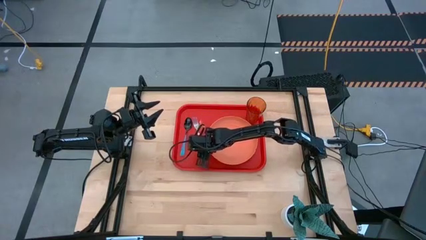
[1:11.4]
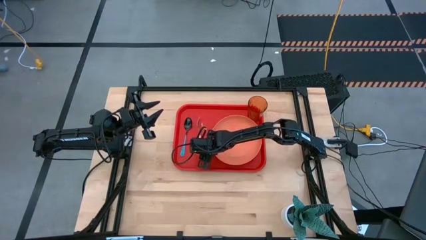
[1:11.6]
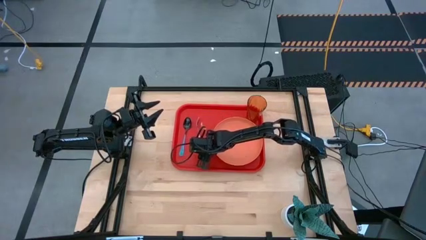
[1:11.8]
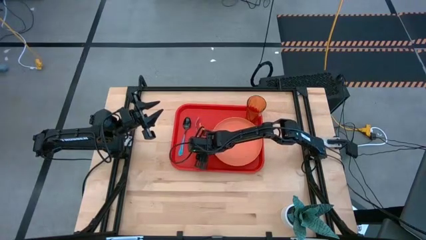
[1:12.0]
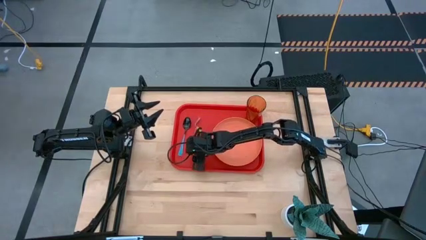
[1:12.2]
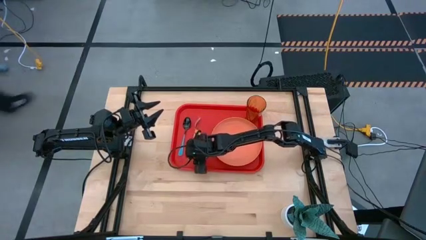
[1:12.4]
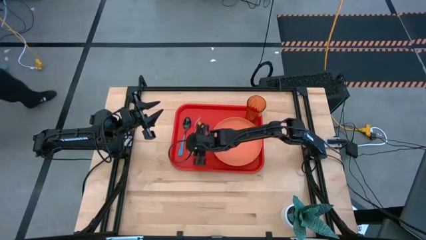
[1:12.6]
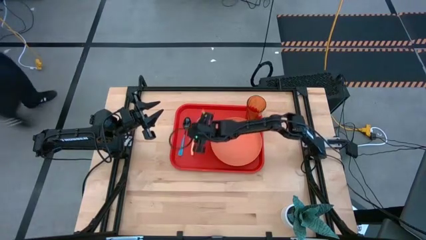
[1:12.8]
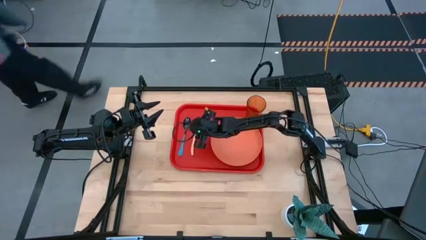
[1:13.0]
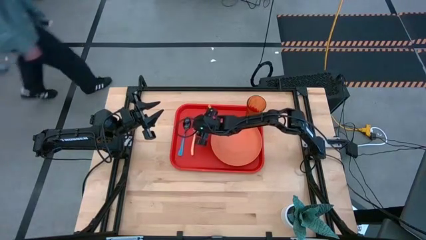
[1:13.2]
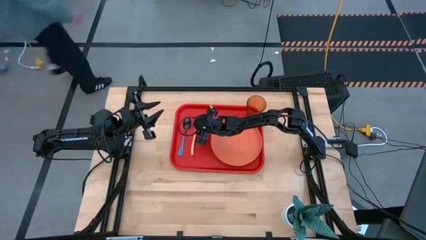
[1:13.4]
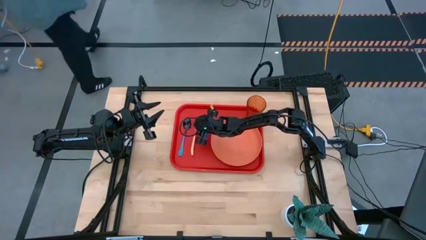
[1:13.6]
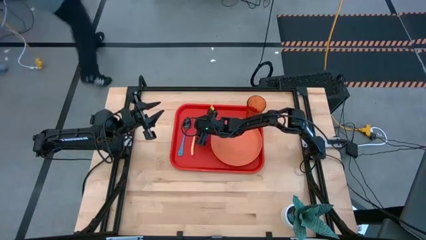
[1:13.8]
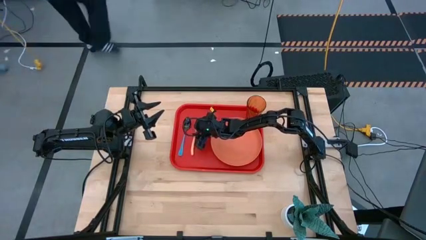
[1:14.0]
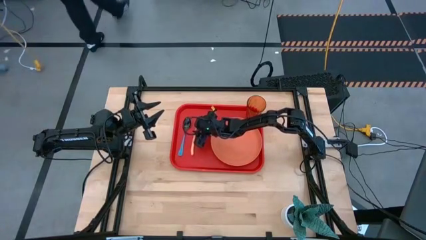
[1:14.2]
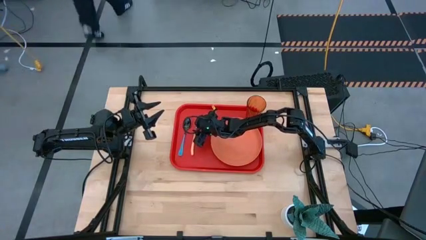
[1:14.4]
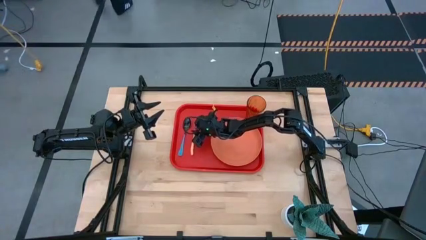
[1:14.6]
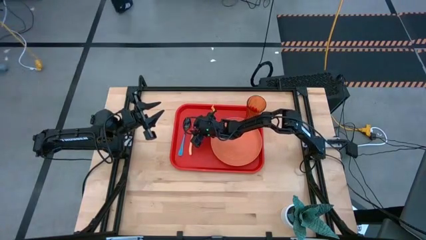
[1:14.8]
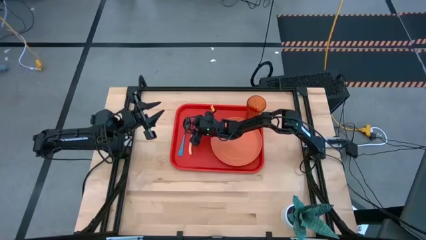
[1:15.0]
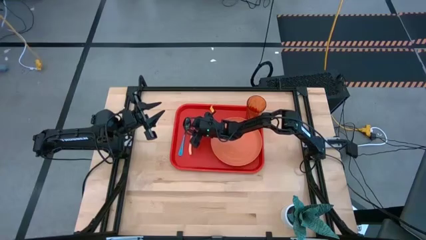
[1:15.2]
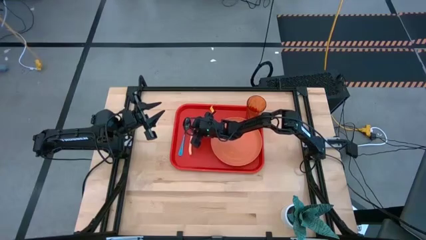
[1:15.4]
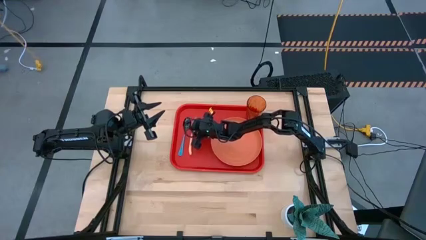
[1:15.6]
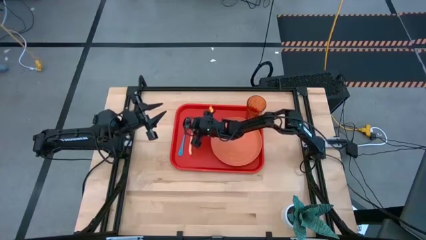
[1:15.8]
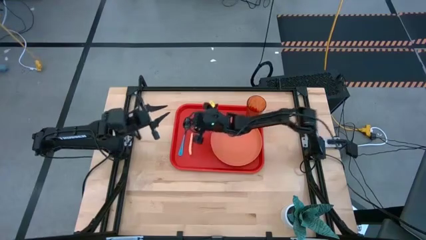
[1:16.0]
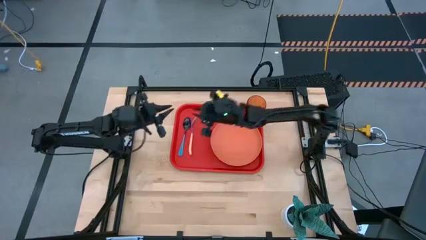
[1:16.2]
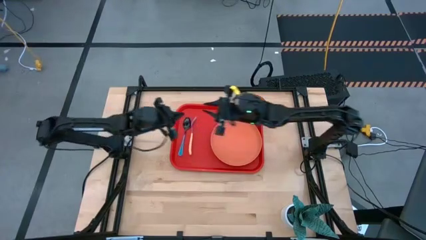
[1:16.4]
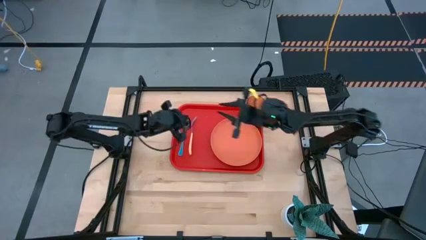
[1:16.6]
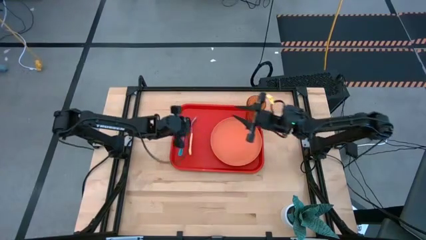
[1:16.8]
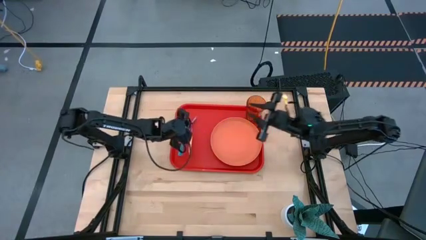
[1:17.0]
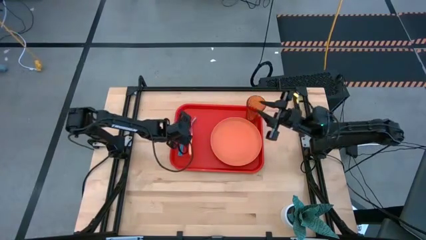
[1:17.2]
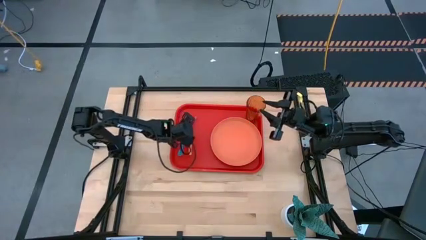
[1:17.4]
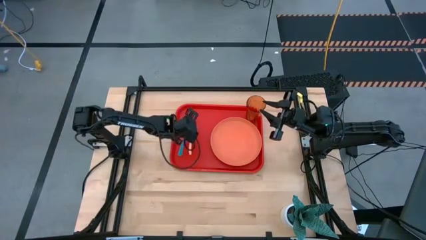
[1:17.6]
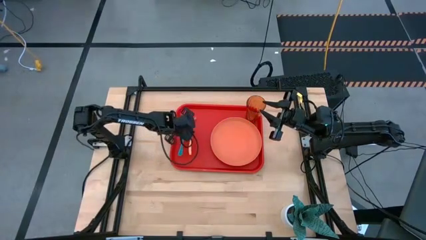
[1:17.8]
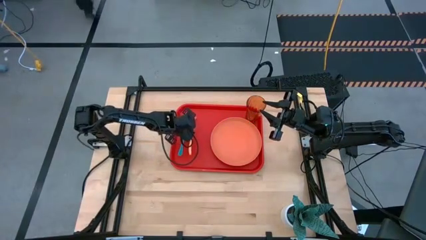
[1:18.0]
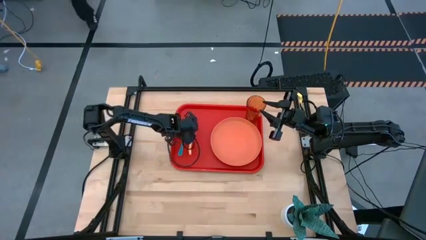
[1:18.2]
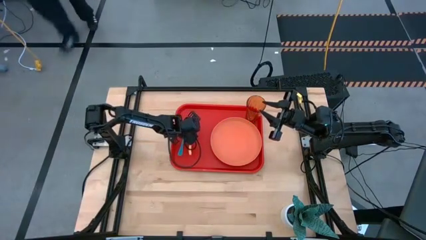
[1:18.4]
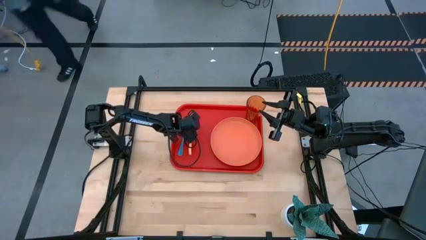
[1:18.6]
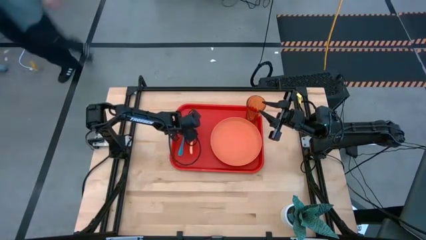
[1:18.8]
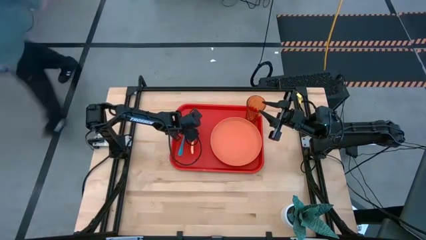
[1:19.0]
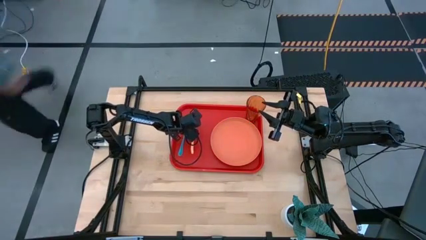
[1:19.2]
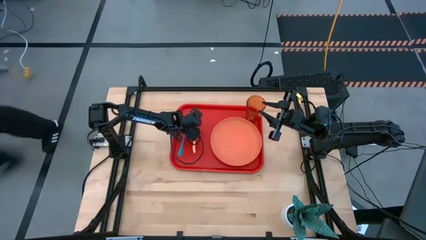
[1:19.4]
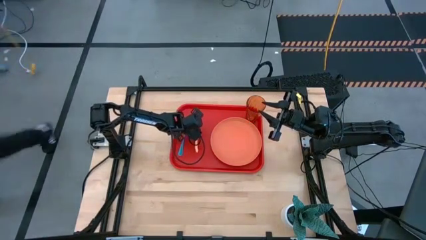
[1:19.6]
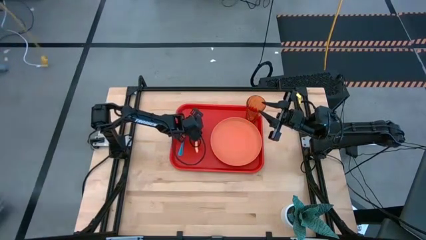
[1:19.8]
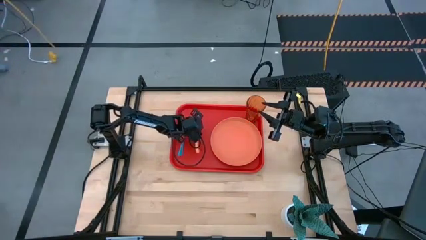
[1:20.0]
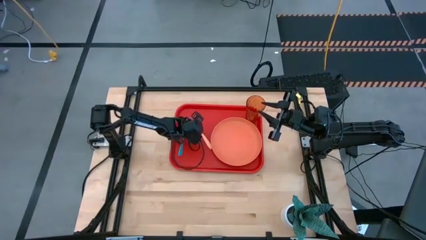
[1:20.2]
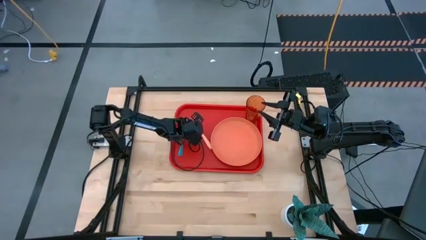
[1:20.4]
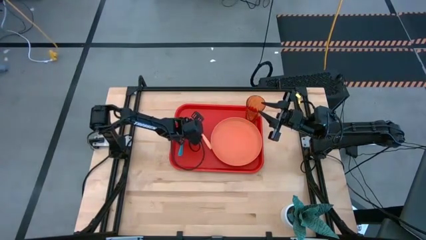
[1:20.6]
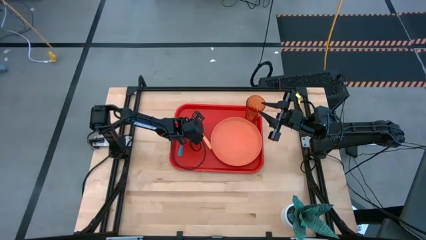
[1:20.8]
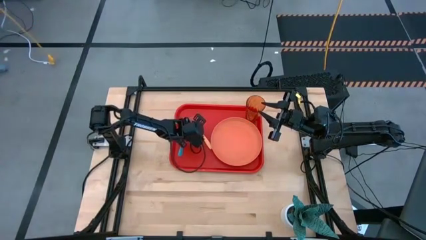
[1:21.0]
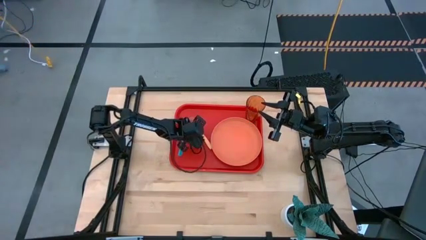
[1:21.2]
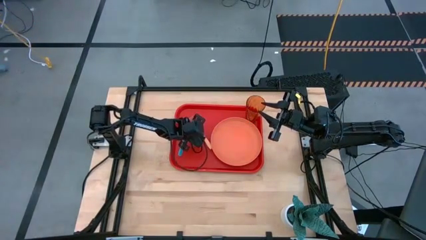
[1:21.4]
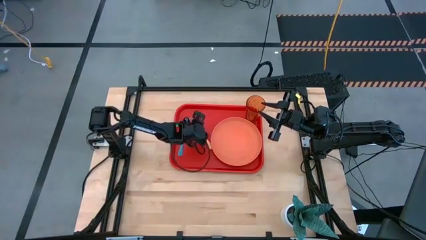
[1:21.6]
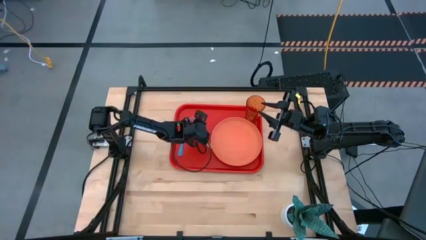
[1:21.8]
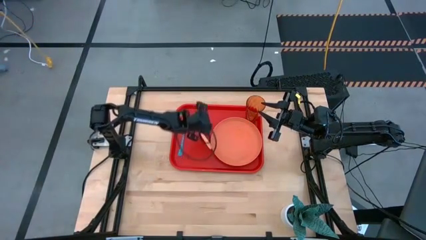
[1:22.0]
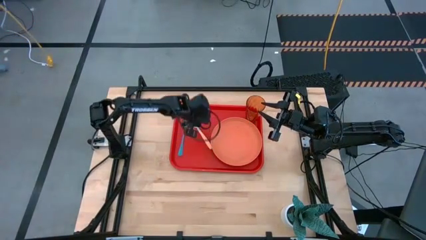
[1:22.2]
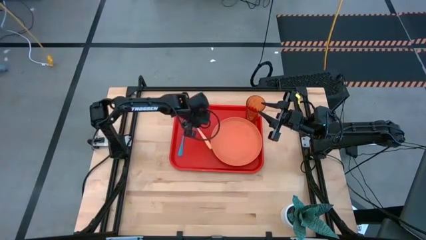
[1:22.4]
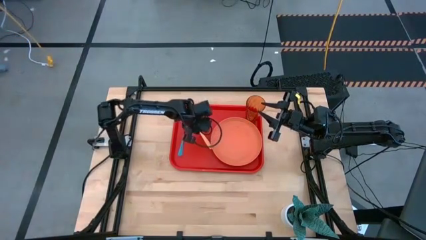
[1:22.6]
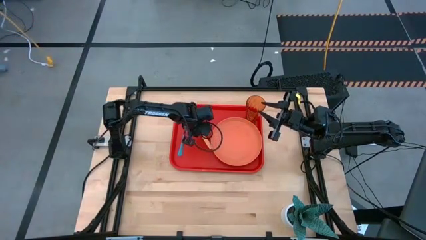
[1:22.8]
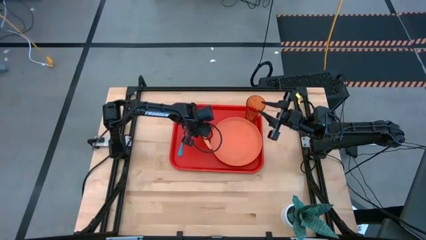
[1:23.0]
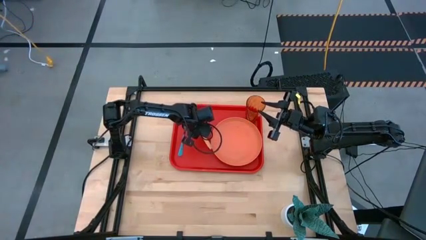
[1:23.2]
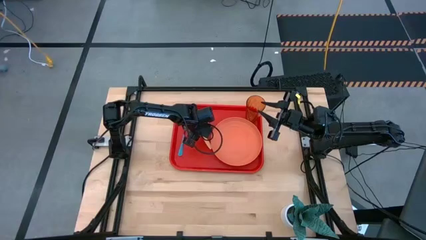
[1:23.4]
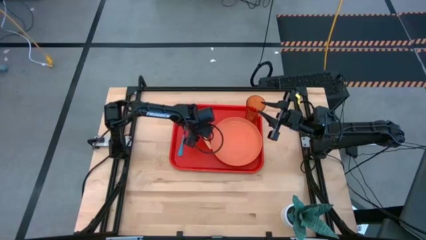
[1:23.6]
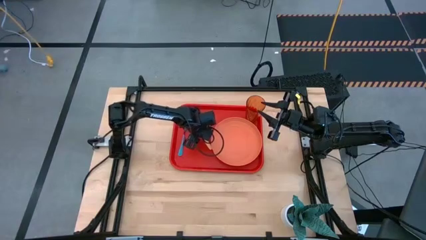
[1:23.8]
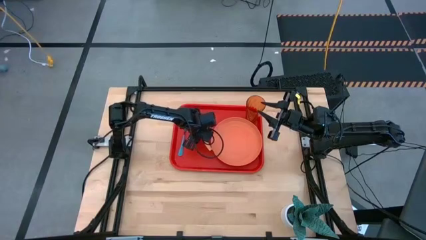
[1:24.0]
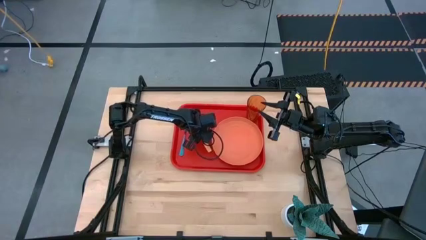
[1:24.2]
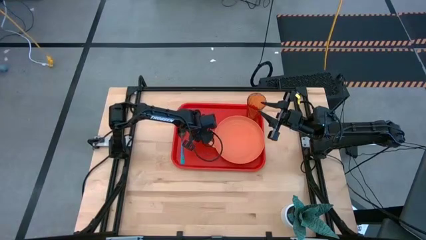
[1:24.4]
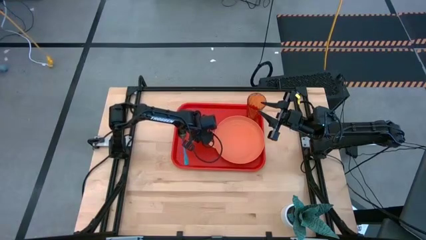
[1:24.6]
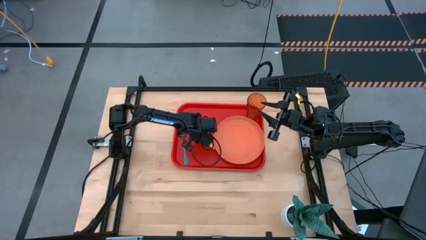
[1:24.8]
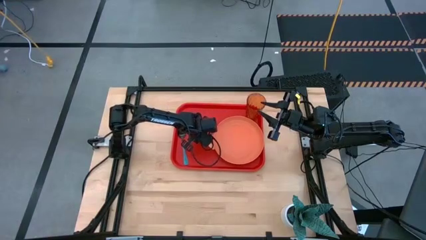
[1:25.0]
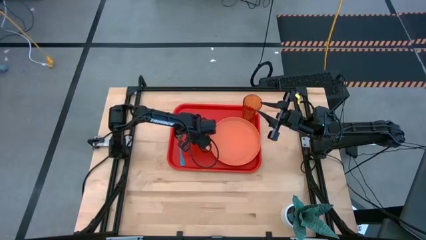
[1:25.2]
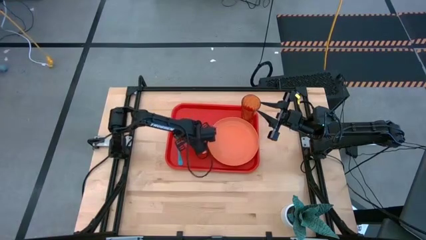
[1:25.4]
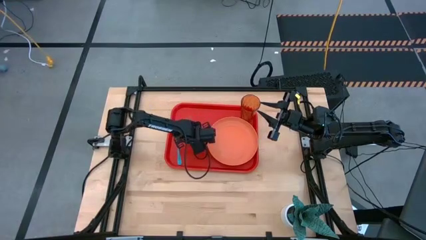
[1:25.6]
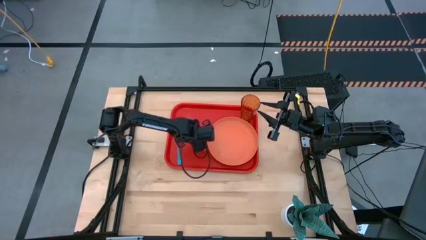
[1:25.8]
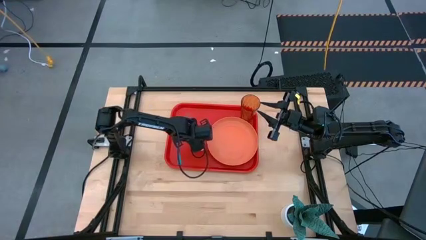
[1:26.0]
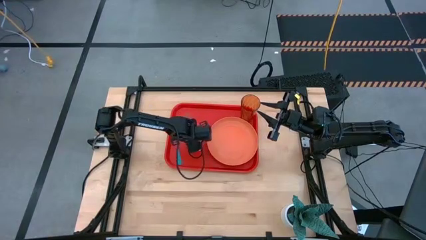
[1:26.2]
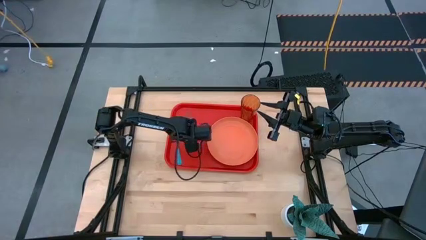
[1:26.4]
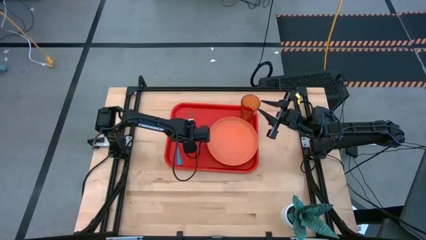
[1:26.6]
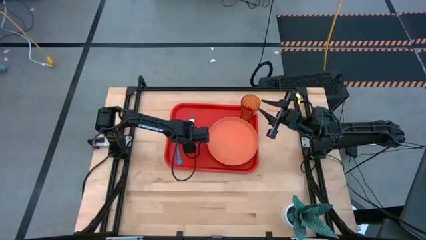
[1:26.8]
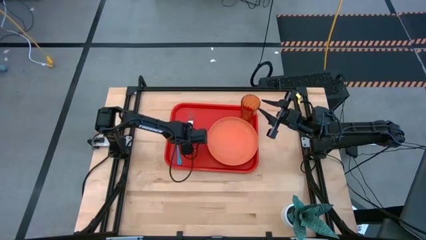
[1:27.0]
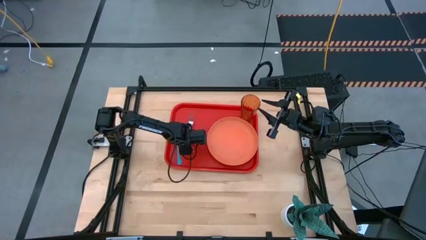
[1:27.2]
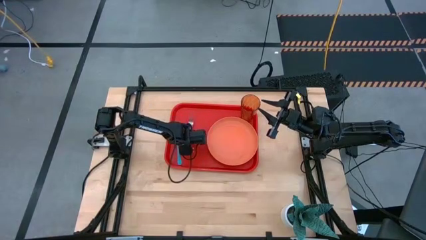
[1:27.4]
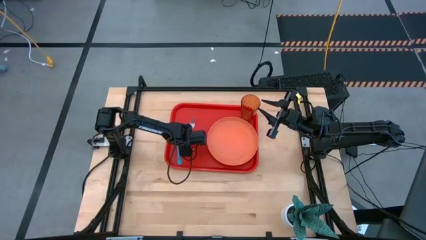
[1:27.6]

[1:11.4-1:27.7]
Task: Pick and place plate/cup/fork/spoon on tray
Put the orange fork on the red tray to the right of the blue spoon
